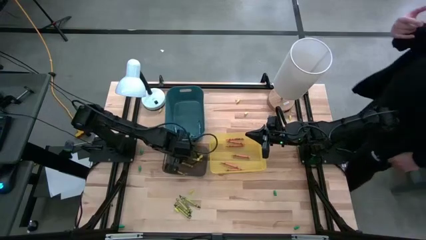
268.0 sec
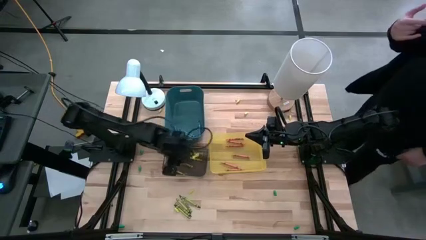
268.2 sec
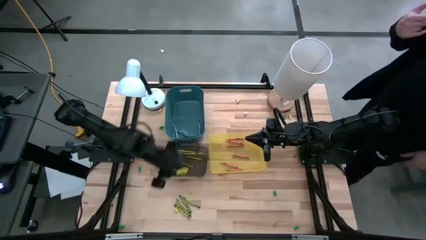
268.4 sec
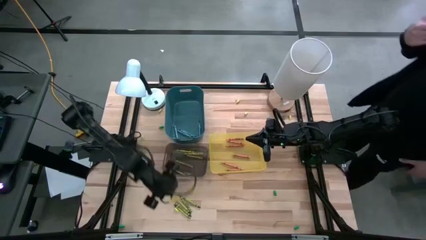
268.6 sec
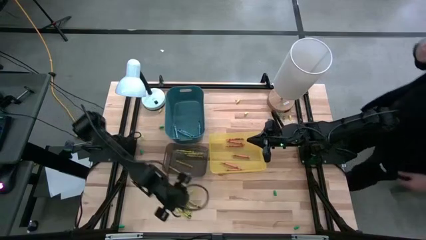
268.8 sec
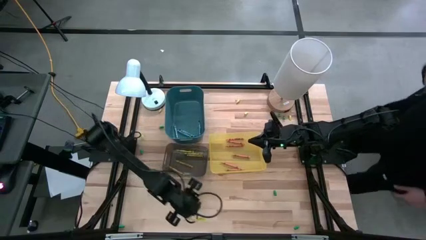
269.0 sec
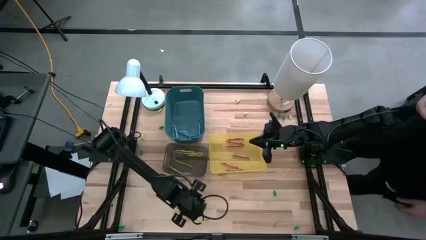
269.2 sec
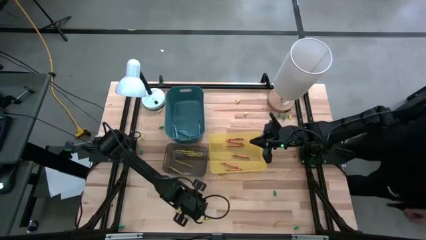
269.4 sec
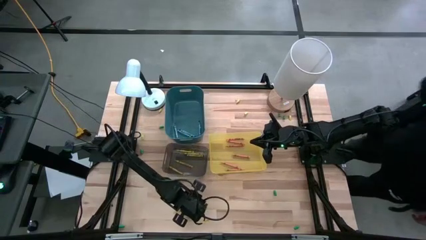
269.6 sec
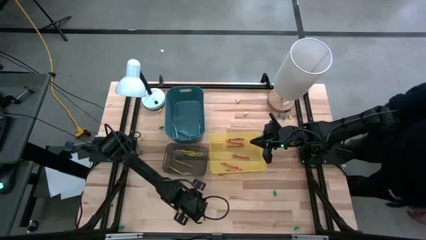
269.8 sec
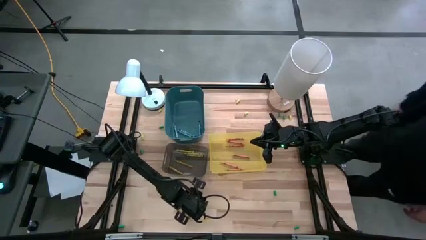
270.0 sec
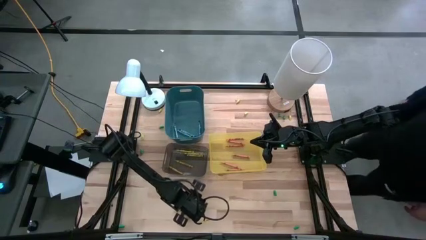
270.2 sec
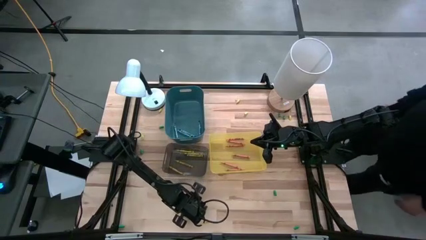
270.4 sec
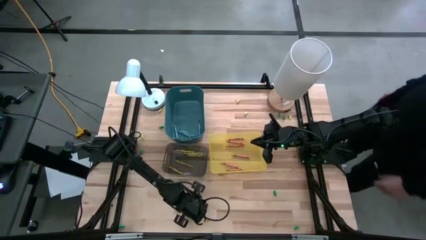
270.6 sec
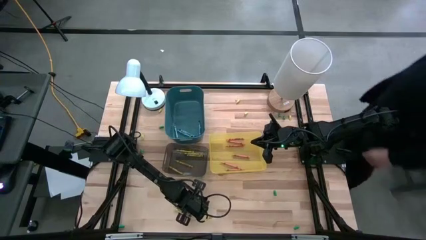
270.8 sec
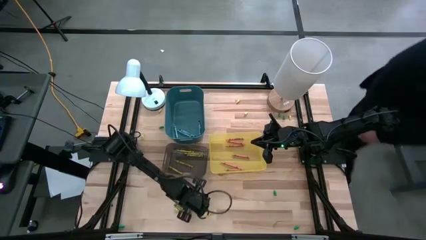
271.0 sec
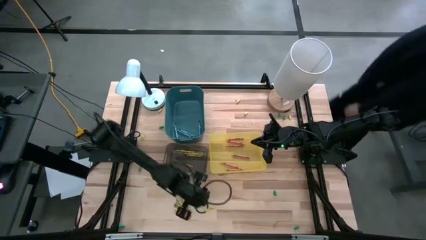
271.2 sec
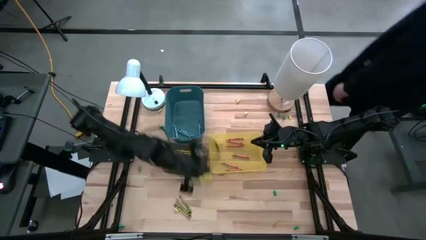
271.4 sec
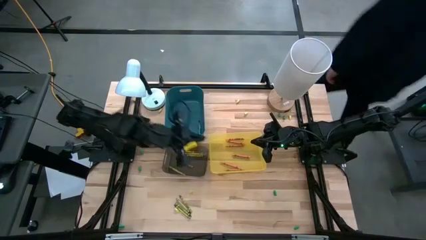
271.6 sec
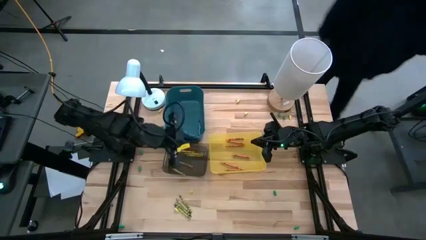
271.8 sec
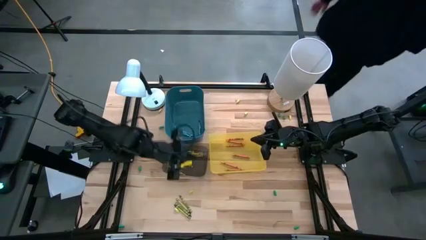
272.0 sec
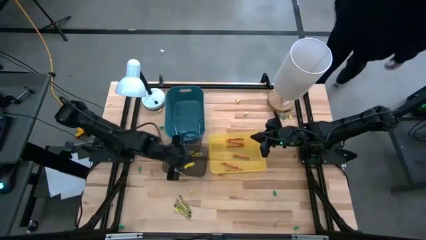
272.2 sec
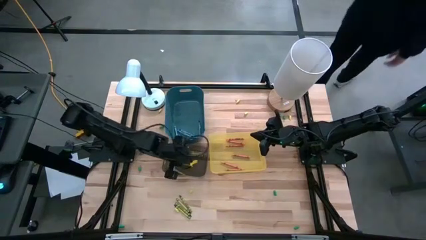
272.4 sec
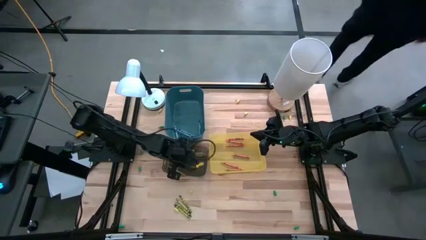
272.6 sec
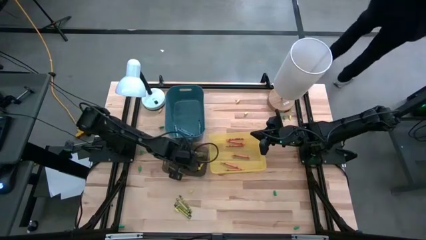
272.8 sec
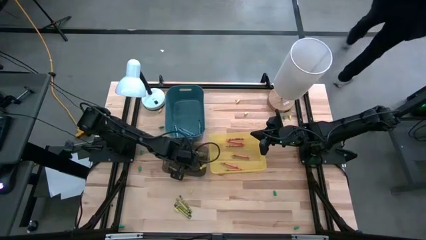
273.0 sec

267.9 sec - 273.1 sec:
Task: Sort crayons
Put the green crayon into the black bin

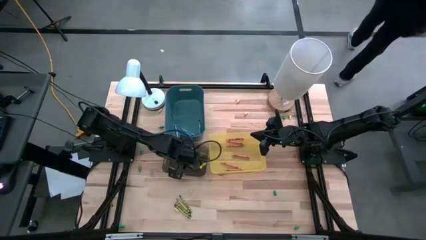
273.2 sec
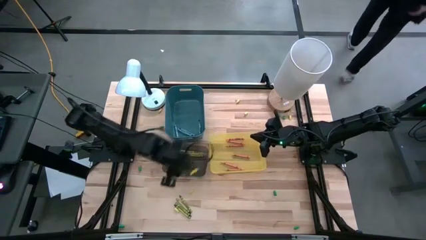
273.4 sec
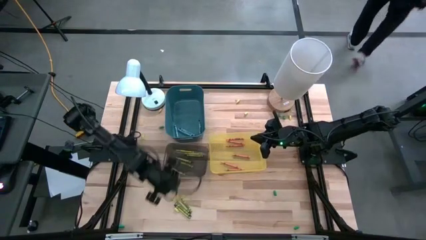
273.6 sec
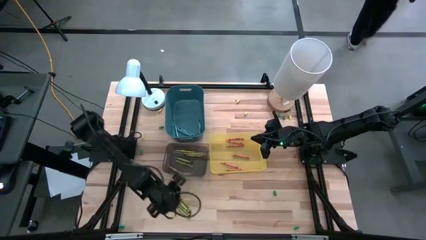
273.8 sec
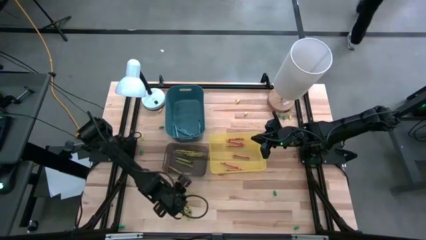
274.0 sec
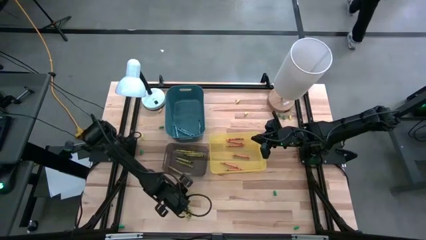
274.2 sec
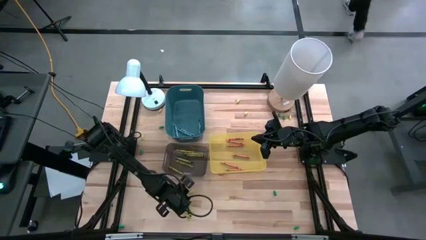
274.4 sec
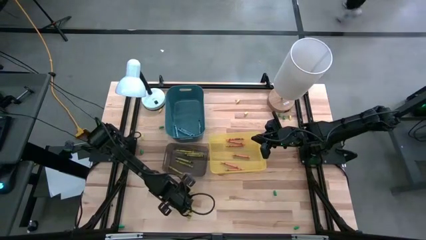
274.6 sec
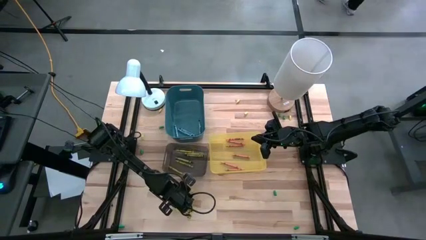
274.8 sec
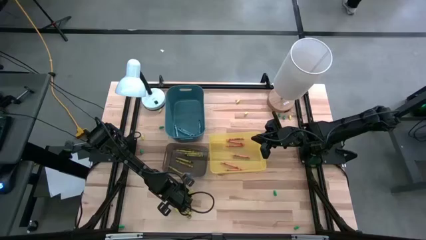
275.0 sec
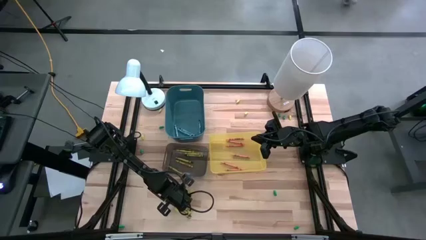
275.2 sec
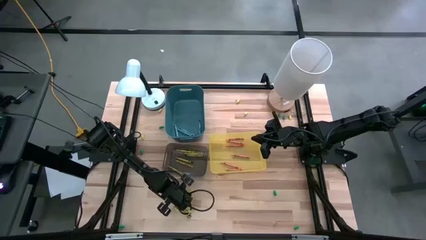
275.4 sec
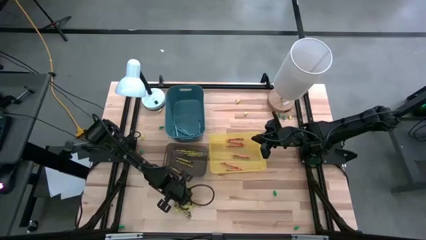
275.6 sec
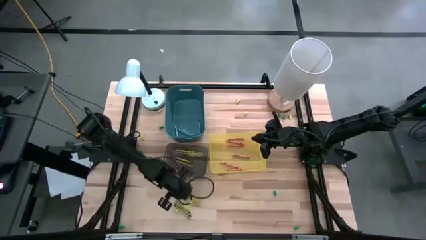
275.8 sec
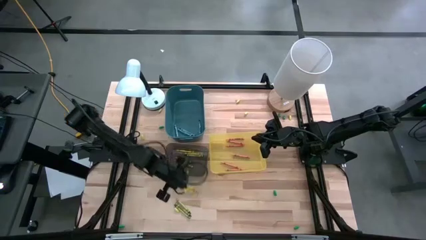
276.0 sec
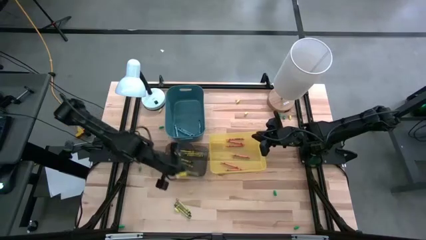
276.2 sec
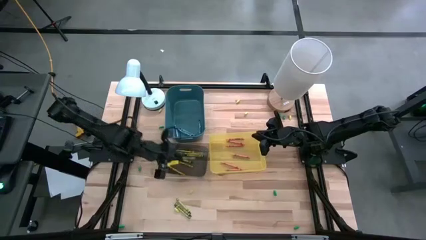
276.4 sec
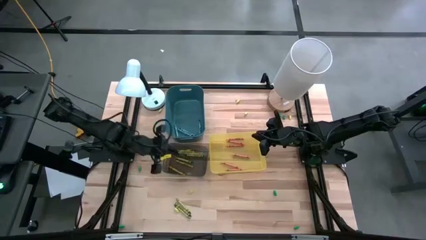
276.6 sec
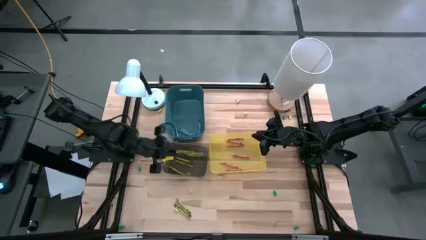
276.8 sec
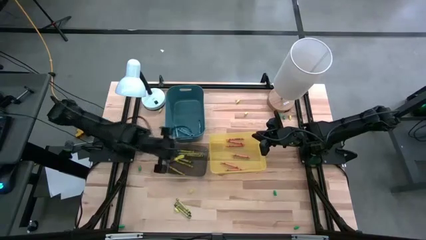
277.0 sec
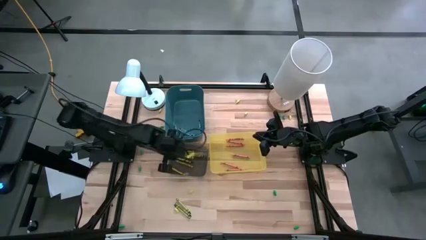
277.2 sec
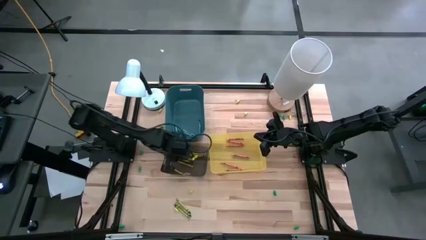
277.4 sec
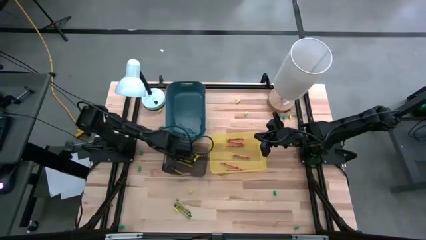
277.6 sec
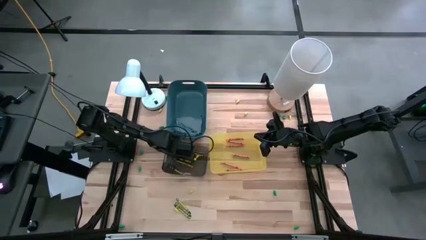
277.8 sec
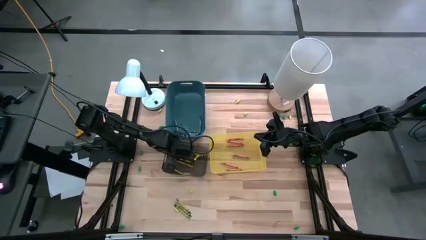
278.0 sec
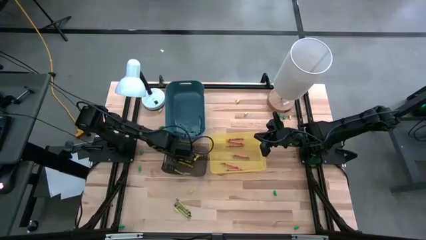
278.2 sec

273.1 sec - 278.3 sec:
Put the green crayon into the black bin

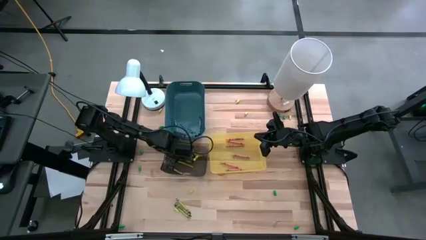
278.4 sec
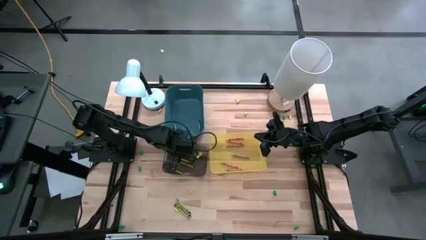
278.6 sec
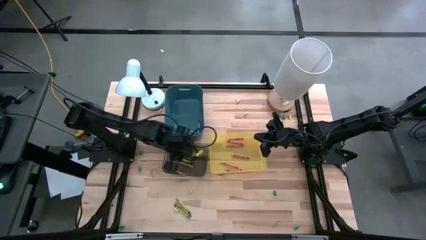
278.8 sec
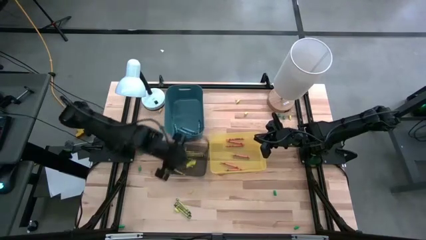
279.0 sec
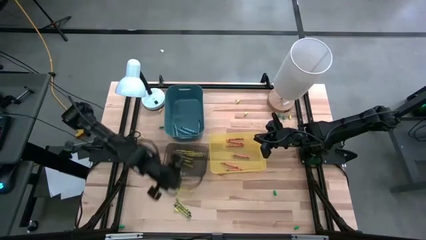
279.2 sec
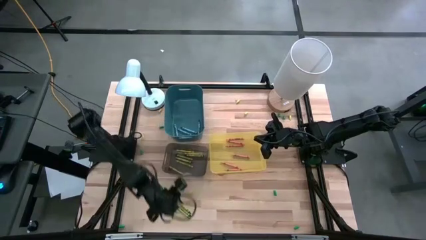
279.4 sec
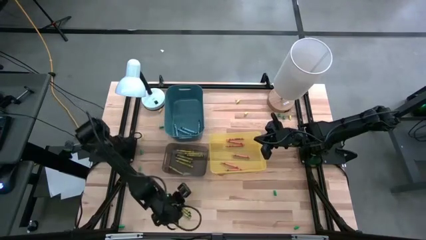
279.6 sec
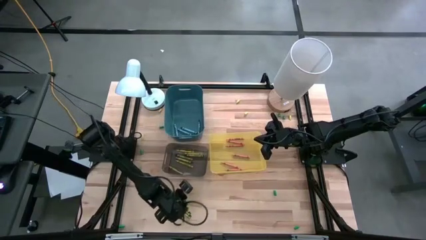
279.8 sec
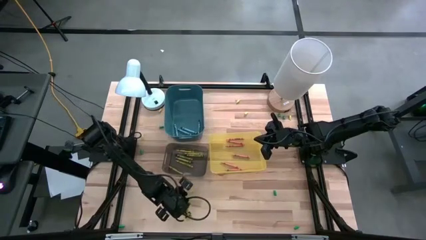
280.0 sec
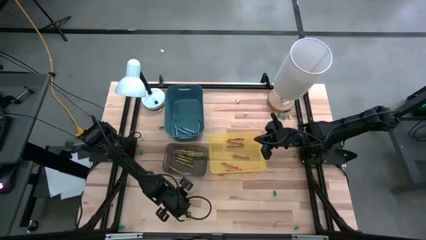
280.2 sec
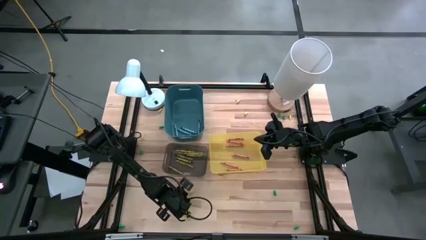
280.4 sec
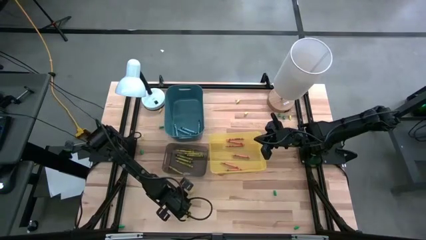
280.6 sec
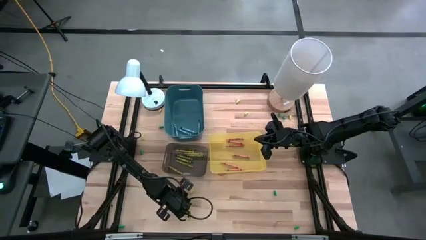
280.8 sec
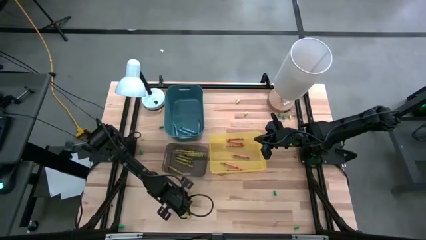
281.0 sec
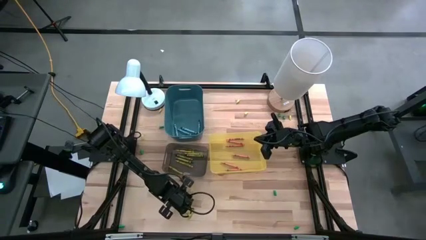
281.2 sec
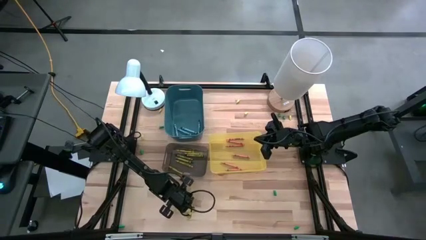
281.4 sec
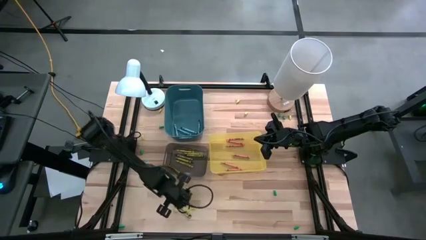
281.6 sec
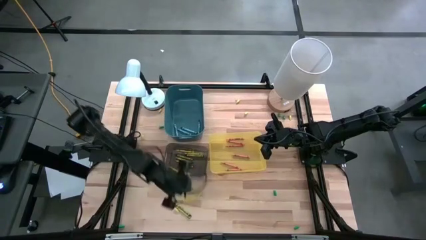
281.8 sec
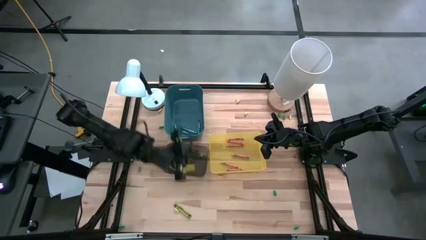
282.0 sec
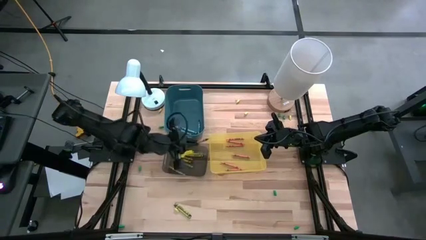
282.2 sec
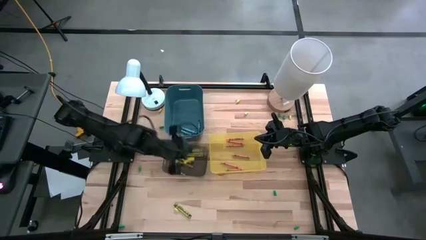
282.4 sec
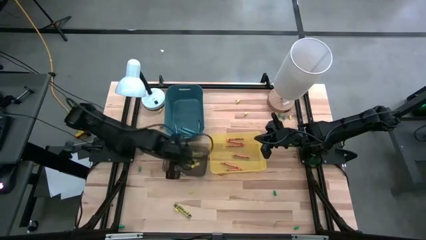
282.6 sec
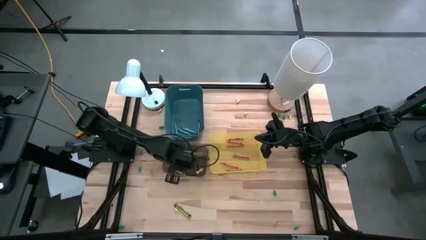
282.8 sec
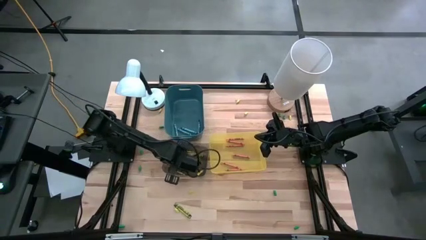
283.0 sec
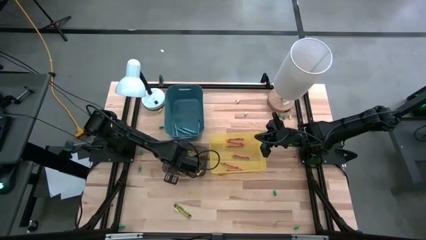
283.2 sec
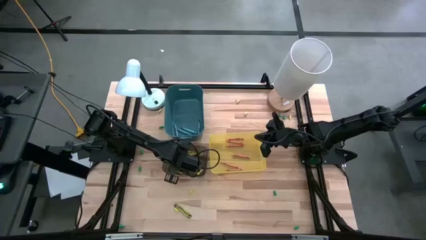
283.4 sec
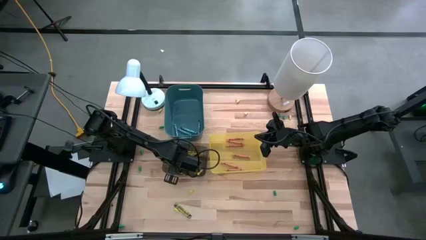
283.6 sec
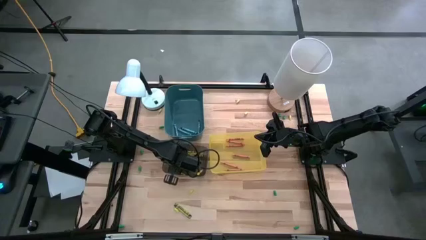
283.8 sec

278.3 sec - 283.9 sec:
Put the green crayon into the black bin

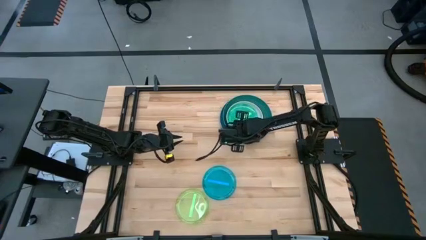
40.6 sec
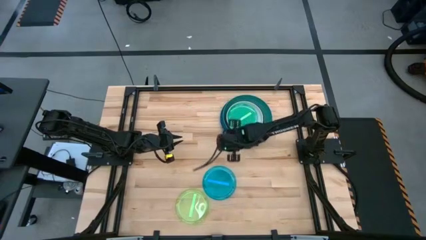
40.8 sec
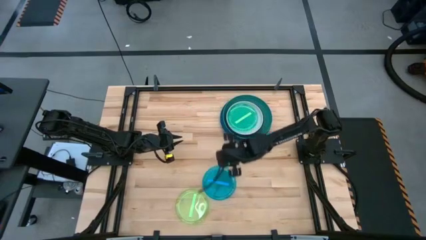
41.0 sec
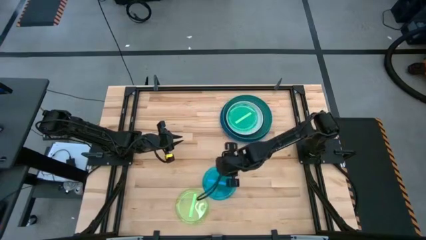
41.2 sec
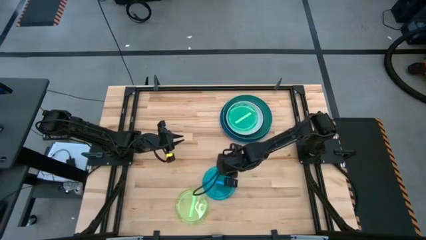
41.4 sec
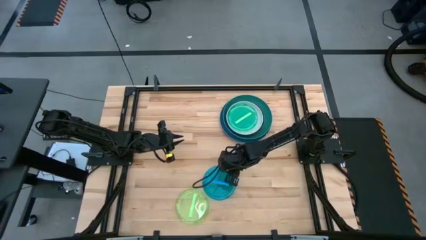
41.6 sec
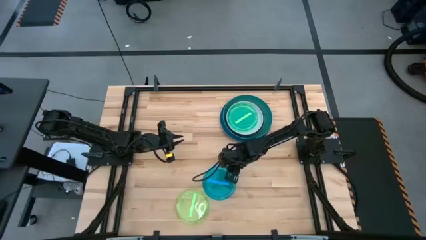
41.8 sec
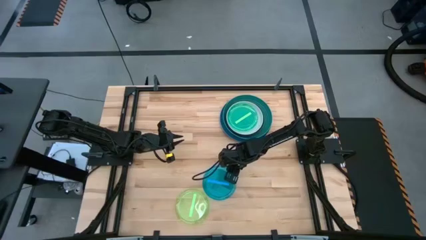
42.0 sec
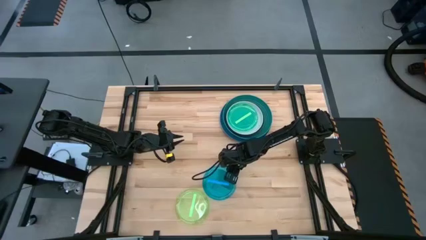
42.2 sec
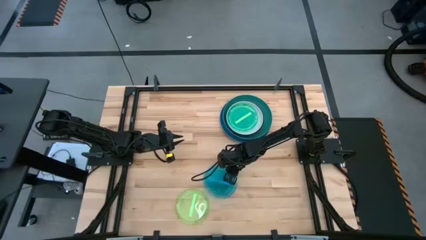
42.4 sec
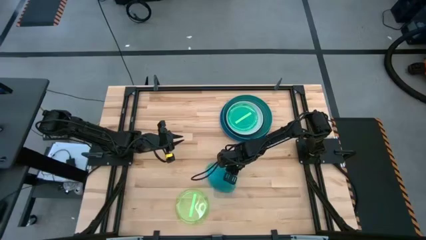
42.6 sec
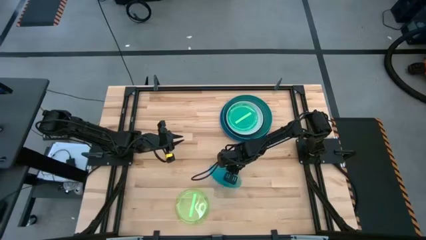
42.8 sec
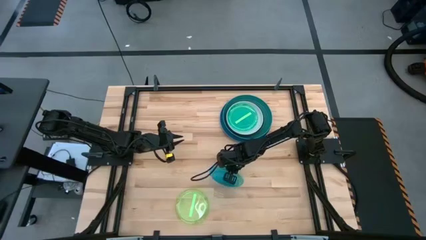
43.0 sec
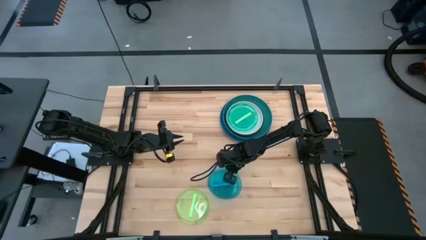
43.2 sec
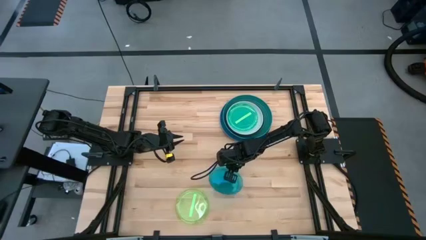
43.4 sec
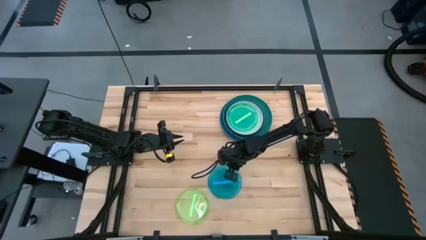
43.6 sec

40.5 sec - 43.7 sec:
Task: Stack plastic plates
Stack the light blue plate on top of the light green plate
